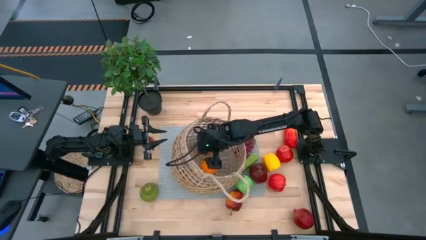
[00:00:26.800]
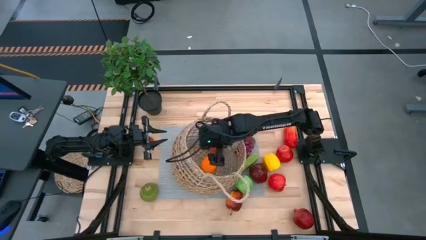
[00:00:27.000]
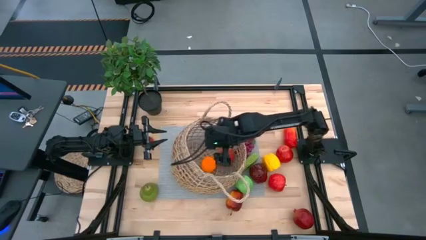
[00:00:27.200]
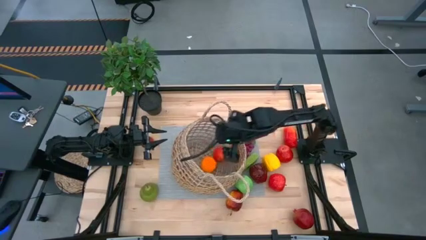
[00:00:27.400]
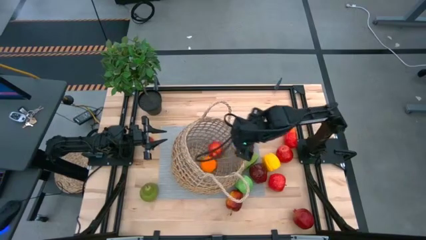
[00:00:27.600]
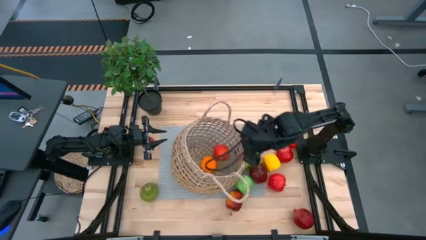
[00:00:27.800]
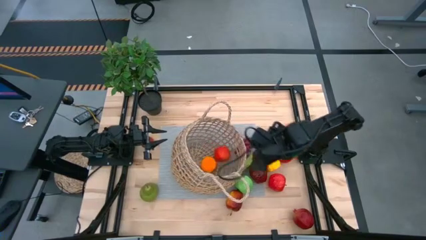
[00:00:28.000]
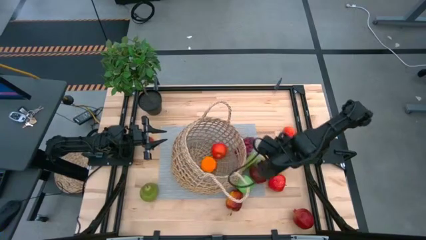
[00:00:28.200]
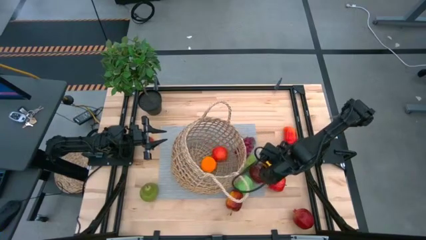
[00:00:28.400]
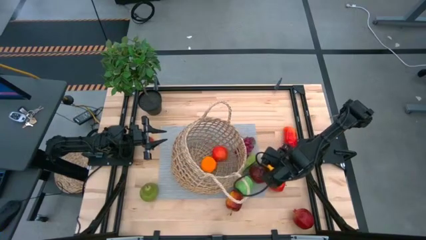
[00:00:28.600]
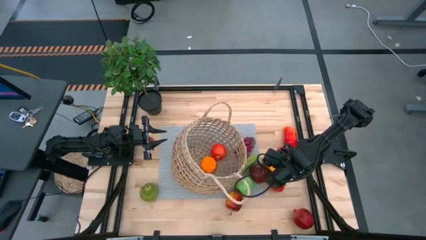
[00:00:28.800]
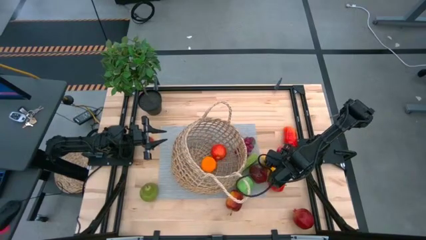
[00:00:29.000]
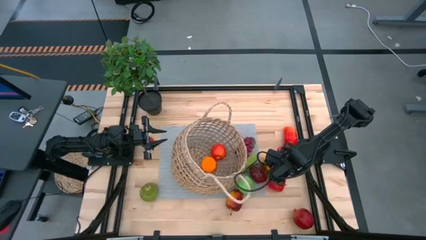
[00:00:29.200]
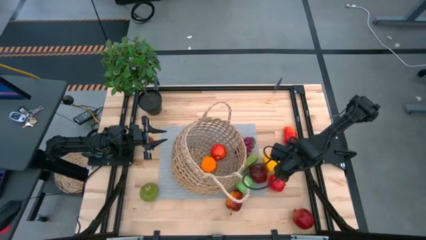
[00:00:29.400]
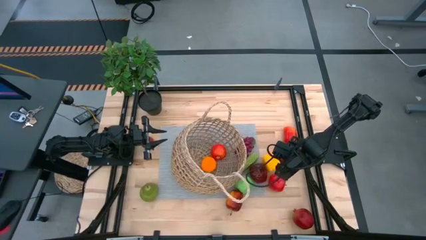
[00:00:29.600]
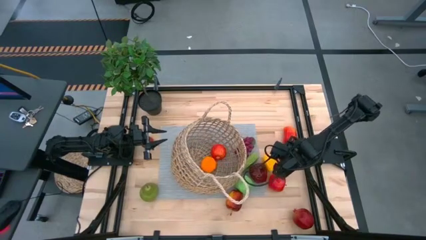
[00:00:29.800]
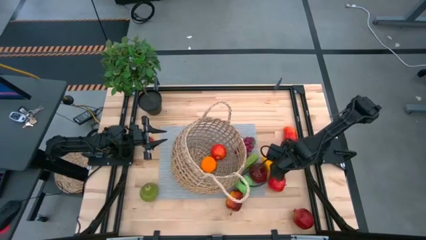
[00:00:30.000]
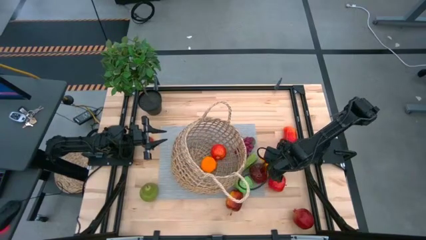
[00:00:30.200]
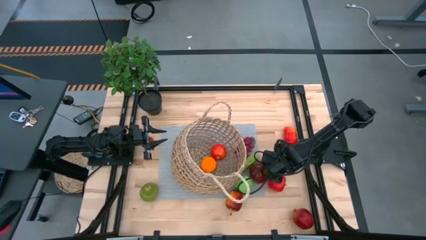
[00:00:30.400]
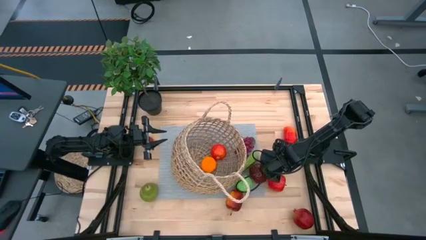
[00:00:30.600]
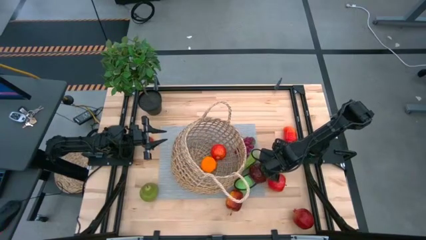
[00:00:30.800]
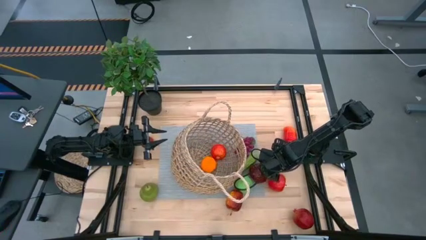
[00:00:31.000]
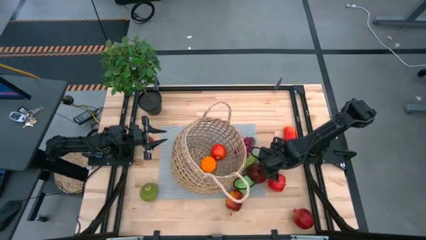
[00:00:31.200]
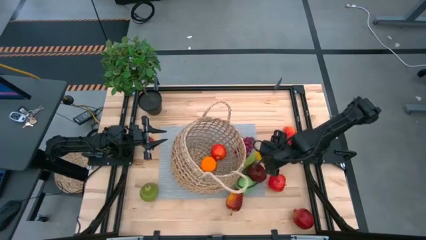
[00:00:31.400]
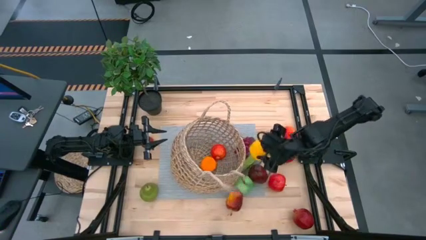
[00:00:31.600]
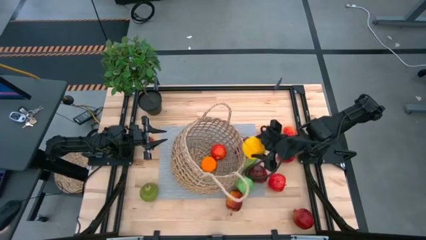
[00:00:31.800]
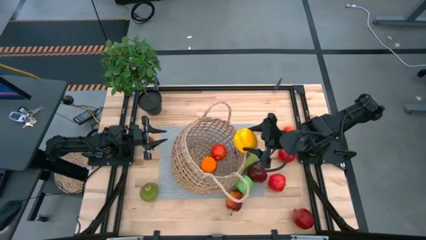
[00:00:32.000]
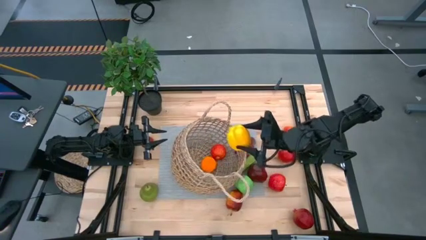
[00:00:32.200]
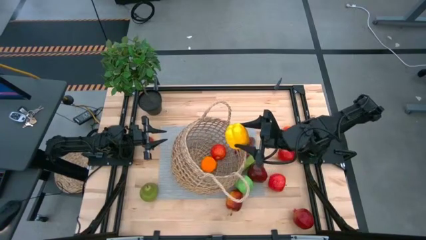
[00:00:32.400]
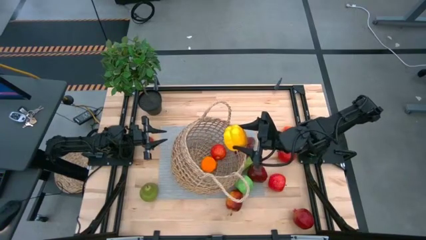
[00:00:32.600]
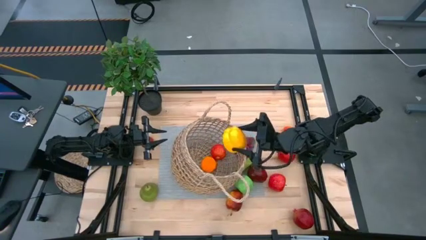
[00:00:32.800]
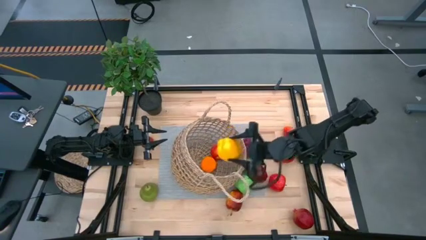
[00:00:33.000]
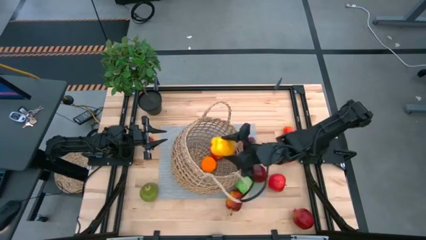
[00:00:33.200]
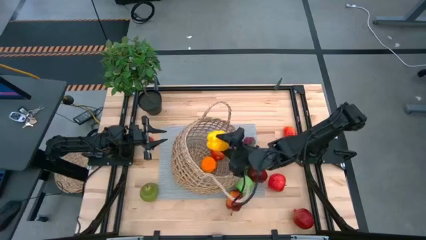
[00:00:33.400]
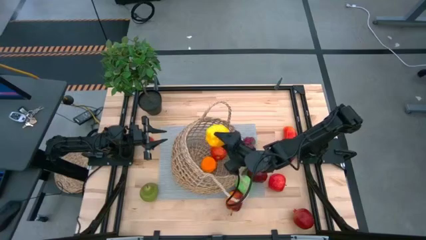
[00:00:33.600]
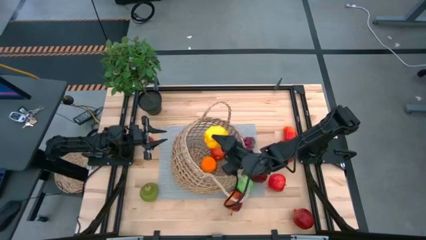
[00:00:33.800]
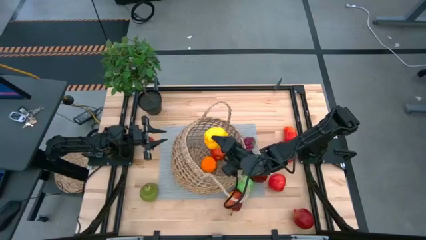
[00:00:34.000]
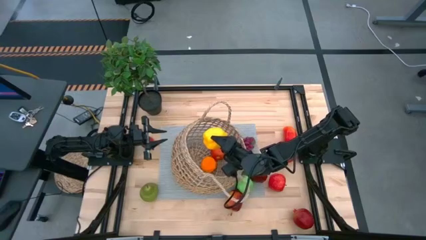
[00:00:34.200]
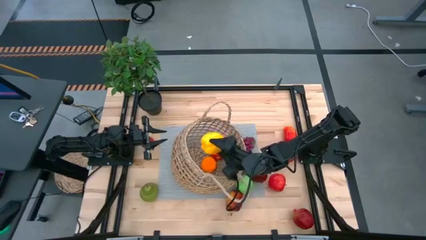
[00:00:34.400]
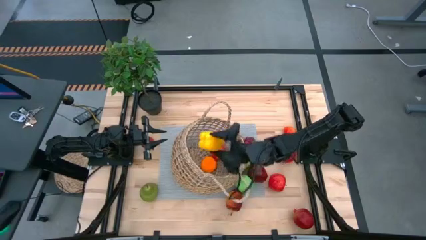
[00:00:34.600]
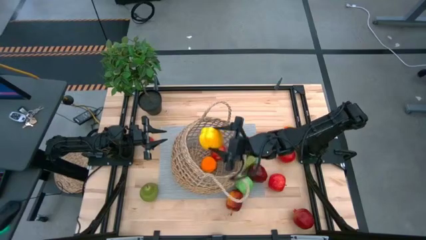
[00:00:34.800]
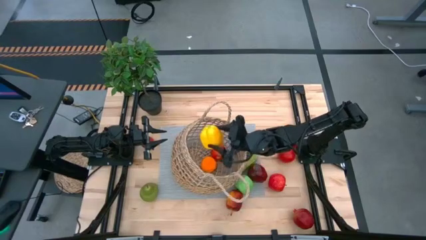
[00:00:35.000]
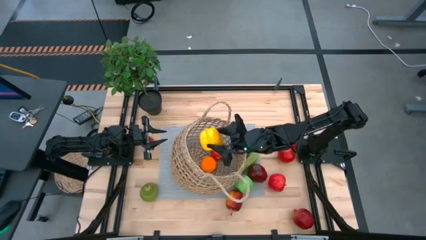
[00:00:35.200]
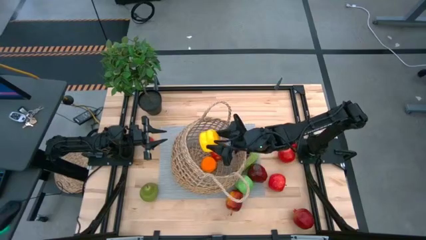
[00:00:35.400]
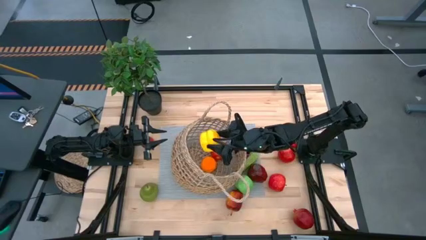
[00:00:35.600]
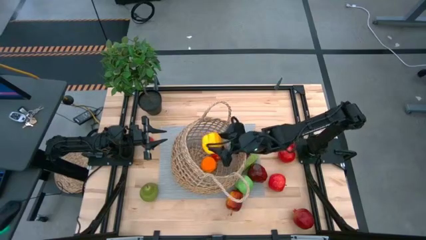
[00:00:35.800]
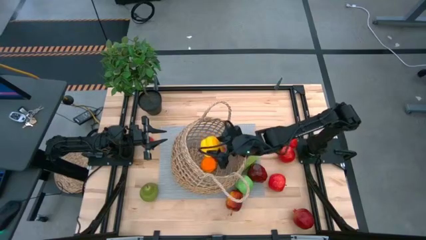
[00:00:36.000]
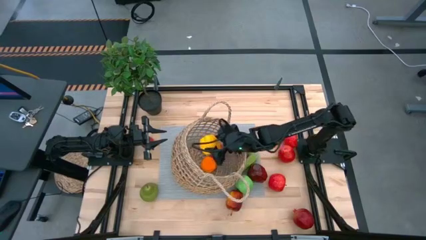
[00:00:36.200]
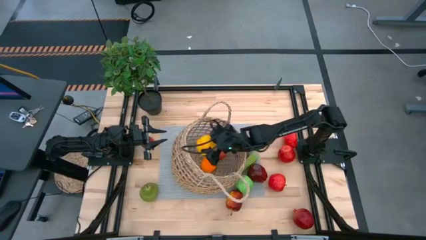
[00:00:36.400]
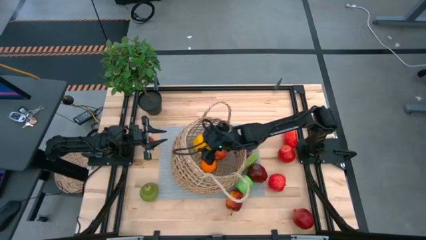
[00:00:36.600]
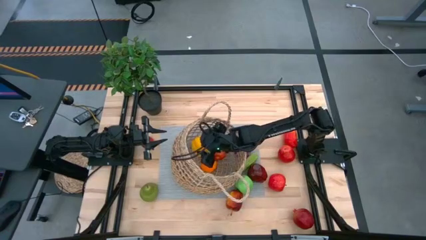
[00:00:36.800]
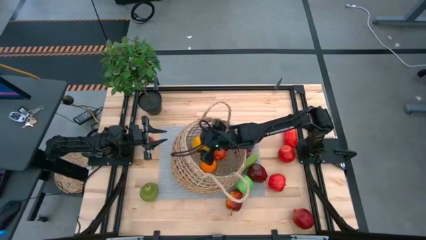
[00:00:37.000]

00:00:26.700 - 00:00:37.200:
Task: Build produce basket
Put the yellow bell pepper into the brown basket

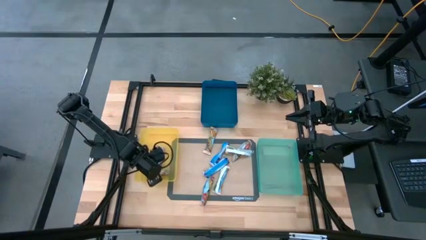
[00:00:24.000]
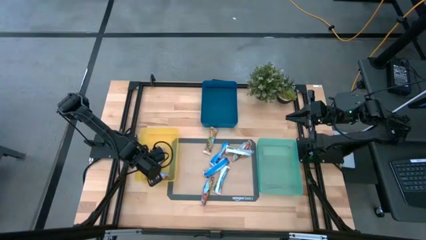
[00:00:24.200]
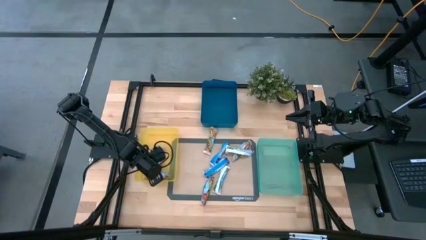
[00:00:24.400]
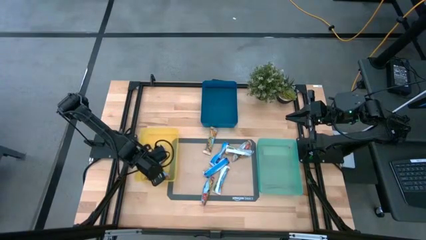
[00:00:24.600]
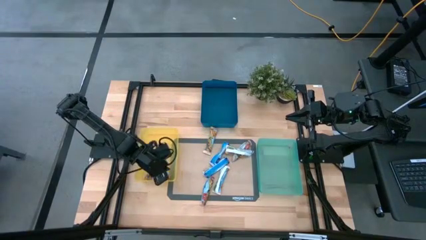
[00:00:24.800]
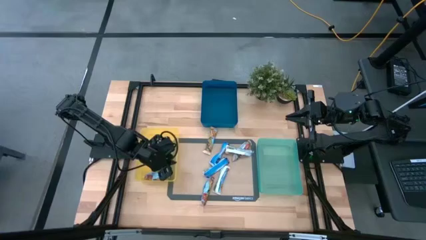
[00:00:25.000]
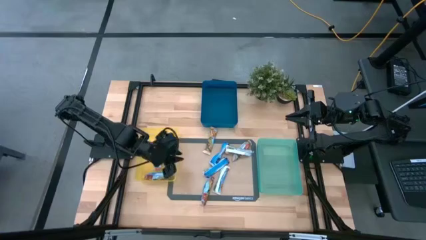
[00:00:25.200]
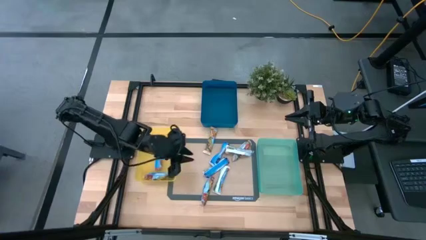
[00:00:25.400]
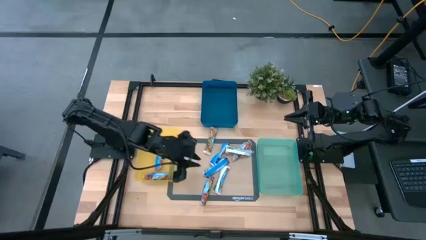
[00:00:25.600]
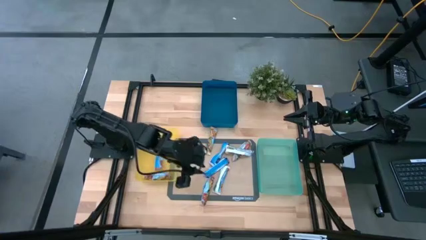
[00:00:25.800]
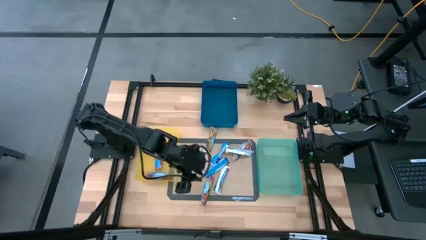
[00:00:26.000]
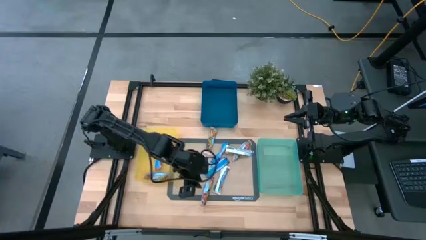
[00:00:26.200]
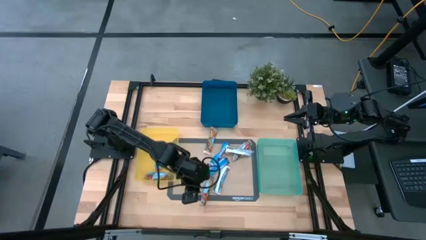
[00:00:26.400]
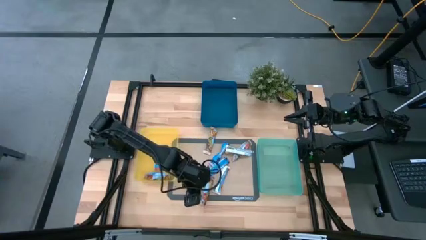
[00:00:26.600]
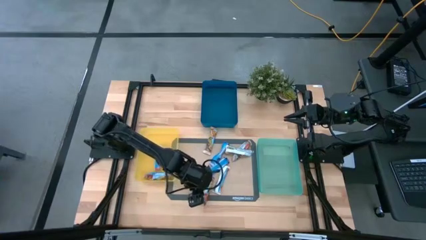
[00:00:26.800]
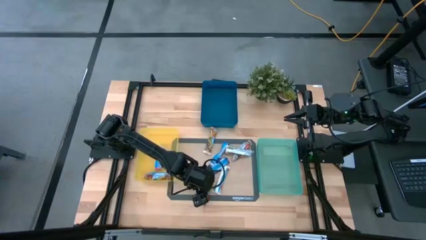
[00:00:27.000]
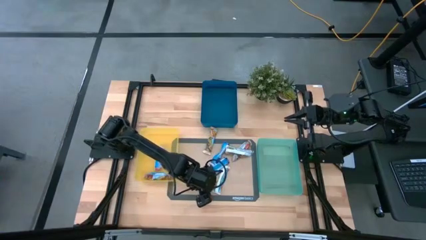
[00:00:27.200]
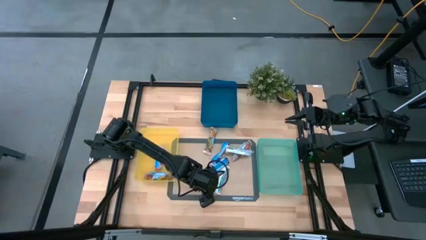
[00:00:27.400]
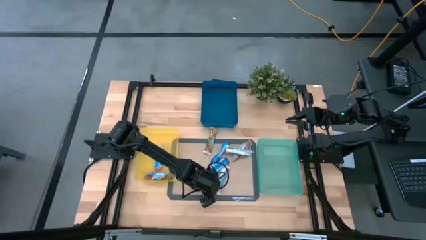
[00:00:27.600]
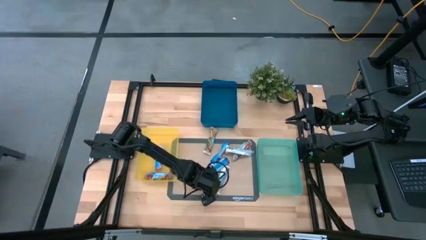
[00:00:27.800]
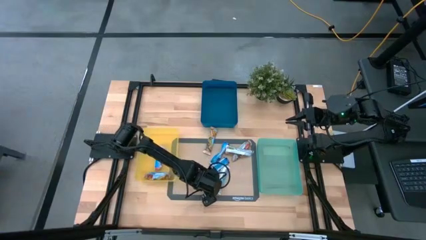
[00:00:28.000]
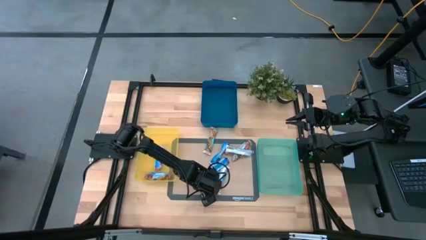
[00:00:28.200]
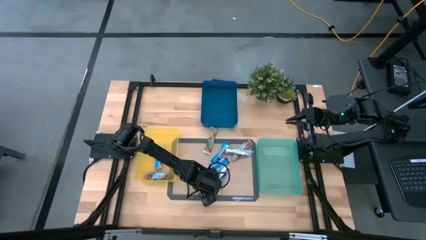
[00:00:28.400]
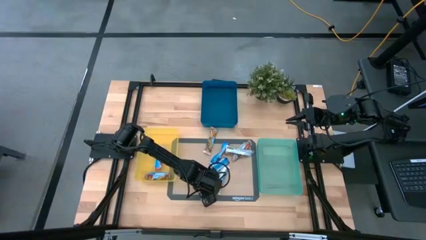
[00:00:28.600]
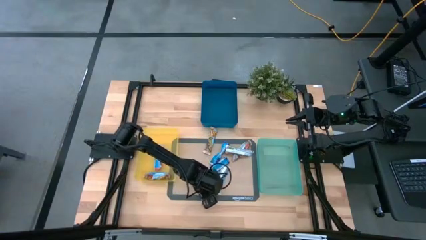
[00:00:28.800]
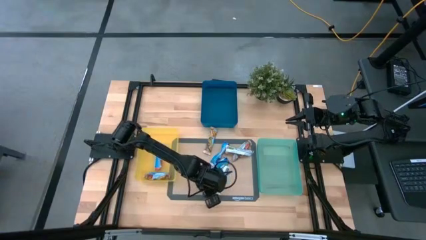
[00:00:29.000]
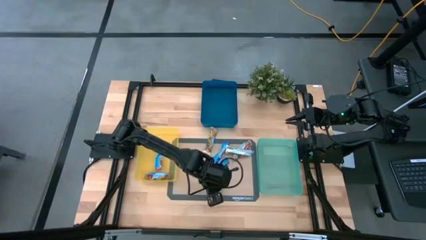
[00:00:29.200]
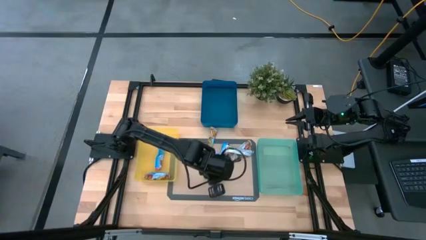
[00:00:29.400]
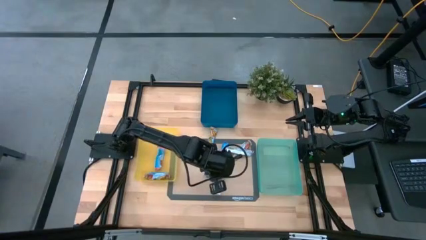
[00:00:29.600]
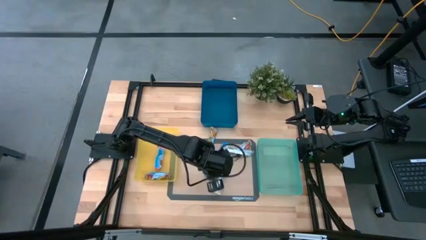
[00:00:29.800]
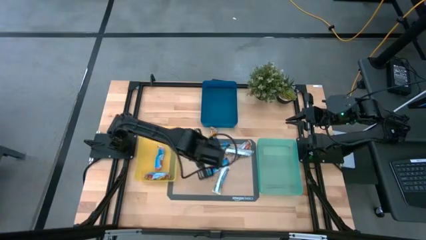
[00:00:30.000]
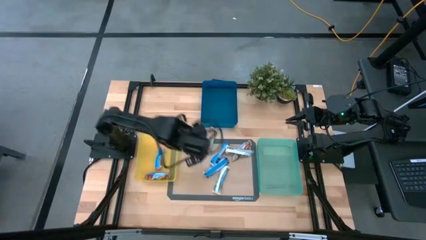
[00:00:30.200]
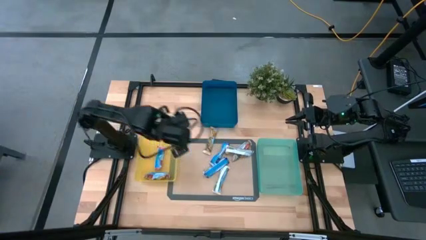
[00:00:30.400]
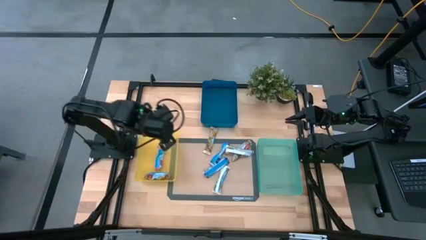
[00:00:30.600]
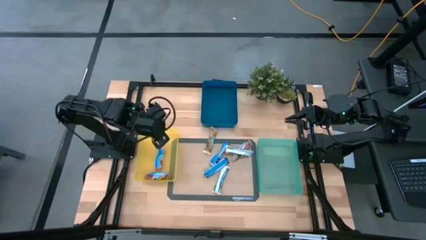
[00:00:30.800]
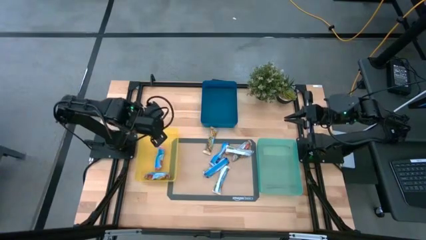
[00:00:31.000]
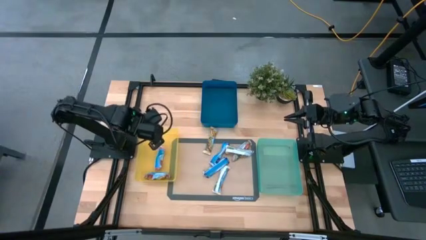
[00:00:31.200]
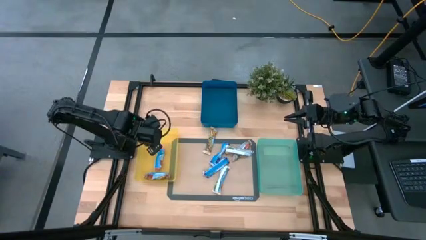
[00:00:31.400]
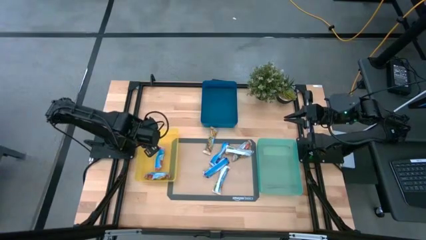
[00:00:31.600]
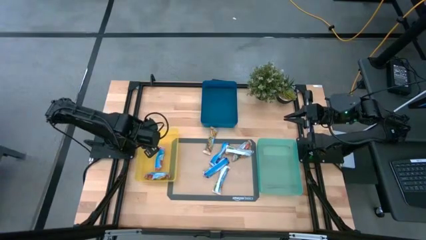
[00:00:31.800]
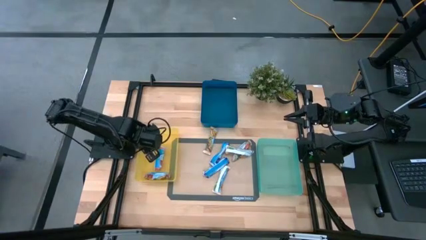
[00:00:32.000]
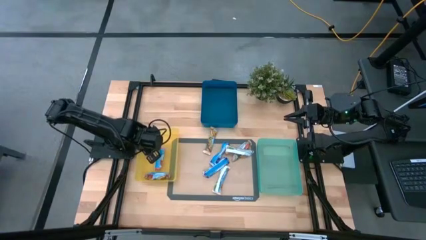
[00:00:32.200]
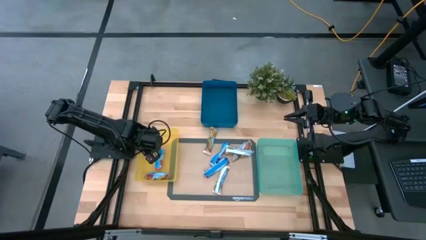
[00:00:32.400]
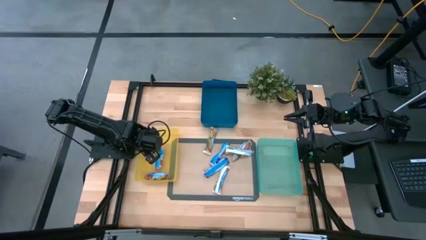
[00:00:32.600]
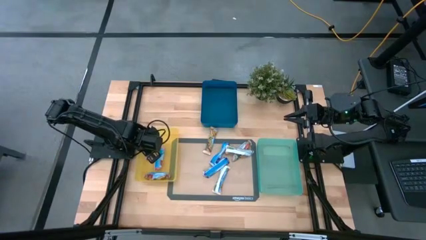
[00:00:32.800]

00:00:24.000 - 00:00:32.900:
Task: Pick and place Granola Bars by type
Put the red granola bar into the yellow bin
